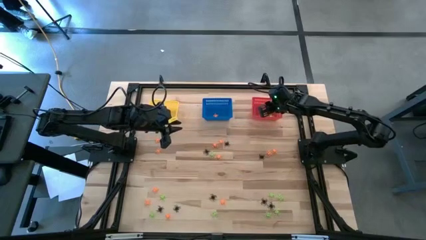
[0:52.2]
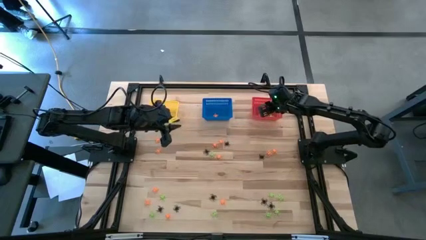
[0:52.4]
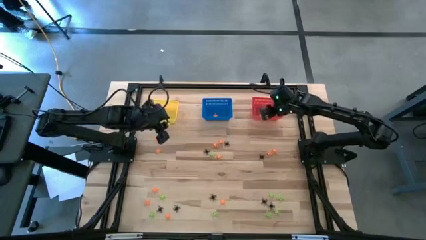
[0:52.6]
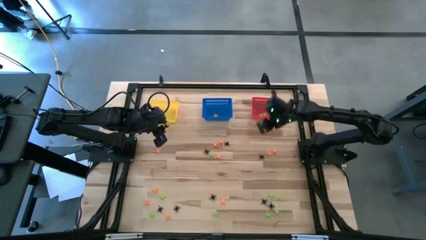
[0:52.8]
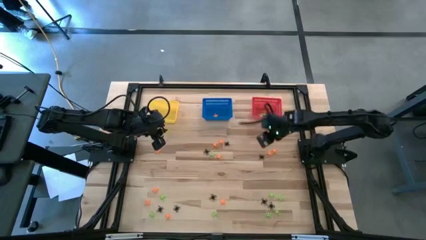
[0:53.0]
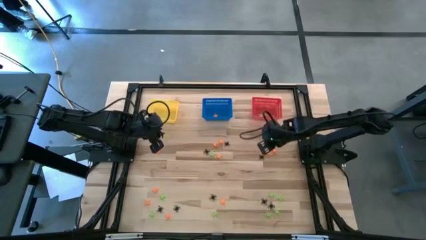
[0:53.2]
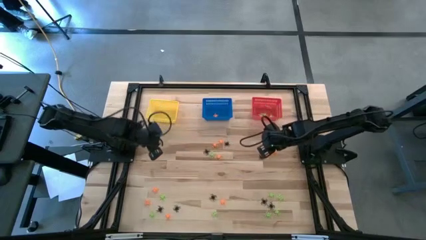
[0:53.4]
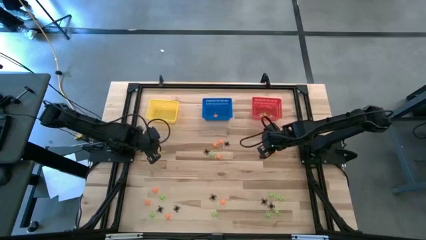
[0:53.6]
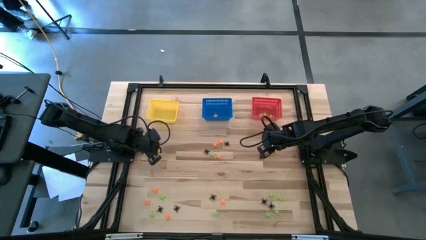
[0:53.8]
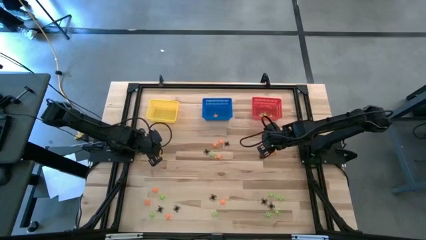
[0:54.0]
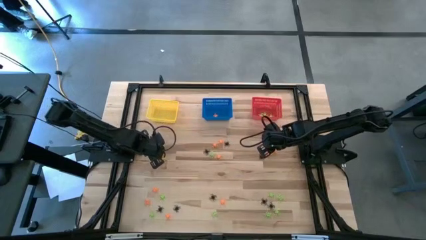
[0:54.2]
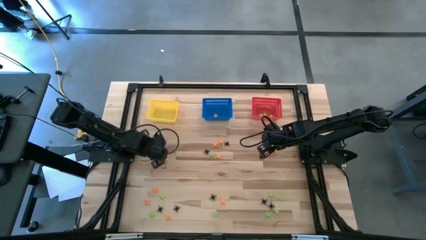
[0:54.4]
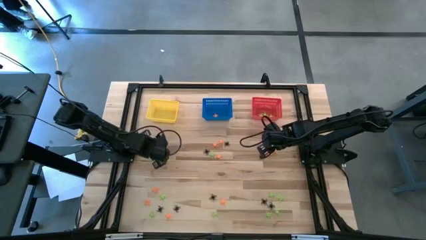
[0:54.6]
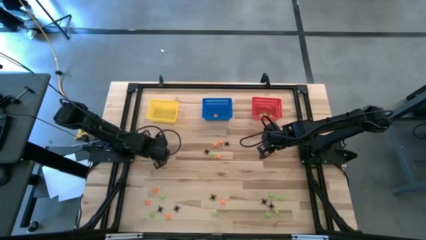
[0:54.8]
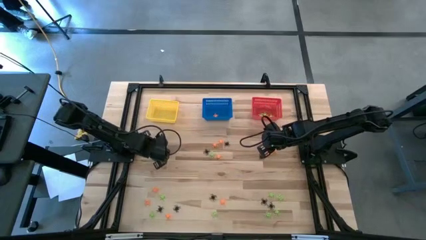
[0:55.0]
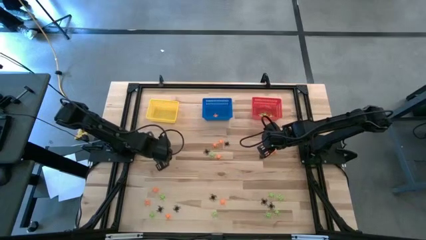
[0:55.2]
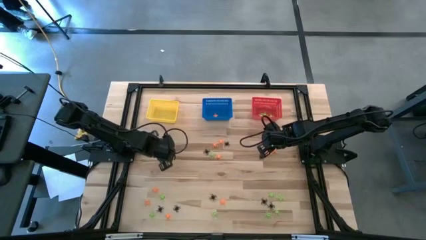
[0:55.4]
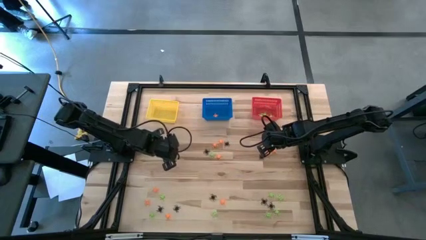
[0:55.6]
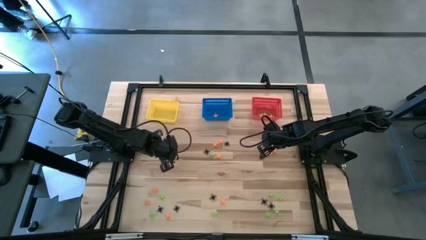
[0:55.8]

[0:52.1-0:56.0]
Task: Sort Halloween decoration
Put the orange spider toy into the blue basket

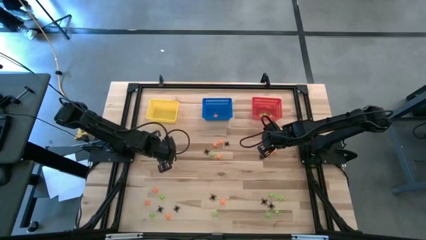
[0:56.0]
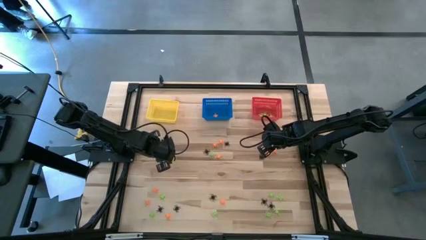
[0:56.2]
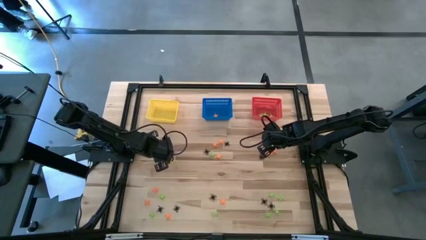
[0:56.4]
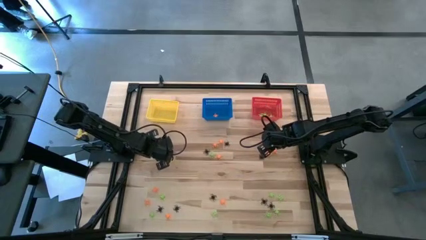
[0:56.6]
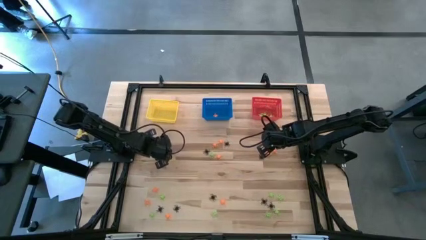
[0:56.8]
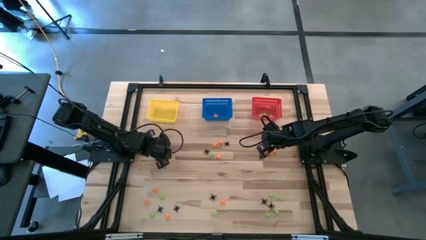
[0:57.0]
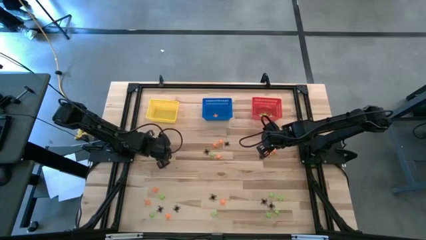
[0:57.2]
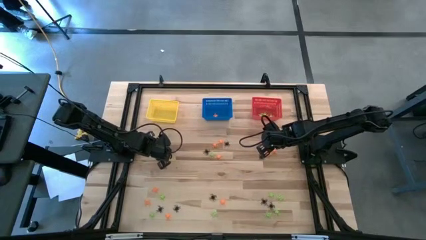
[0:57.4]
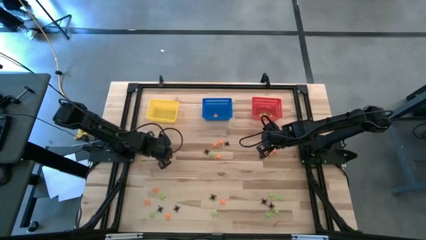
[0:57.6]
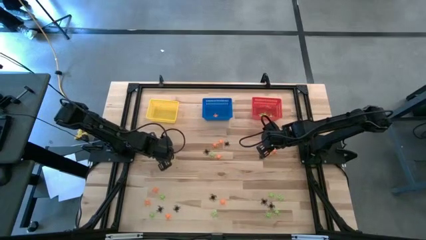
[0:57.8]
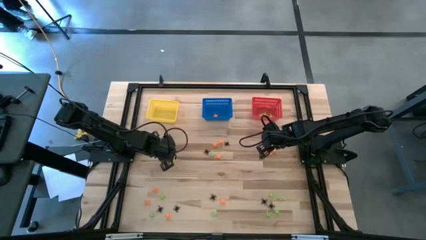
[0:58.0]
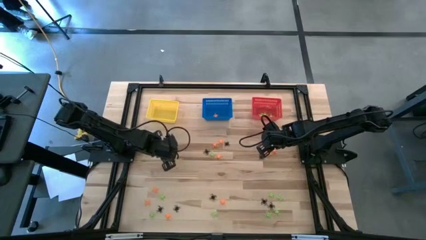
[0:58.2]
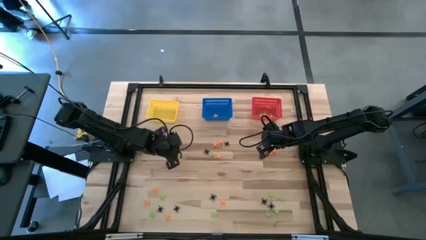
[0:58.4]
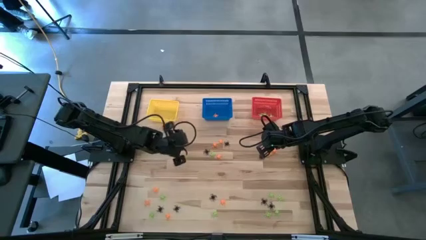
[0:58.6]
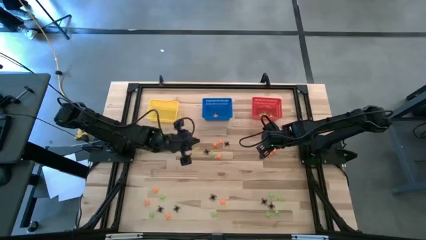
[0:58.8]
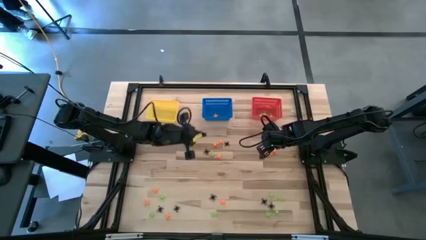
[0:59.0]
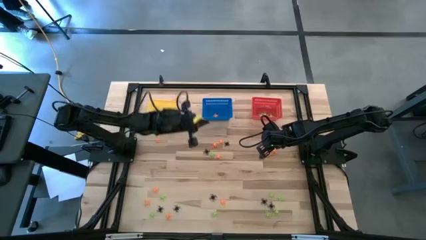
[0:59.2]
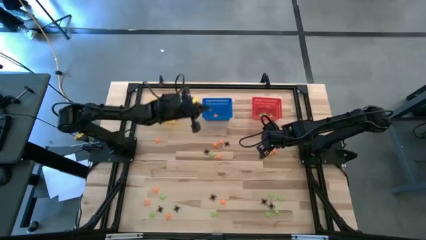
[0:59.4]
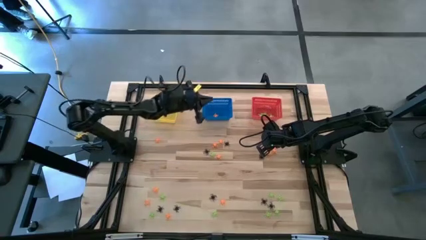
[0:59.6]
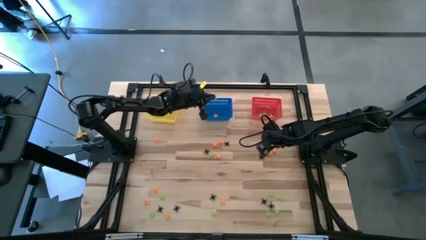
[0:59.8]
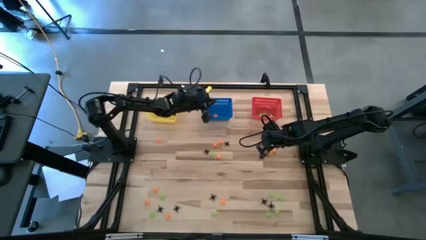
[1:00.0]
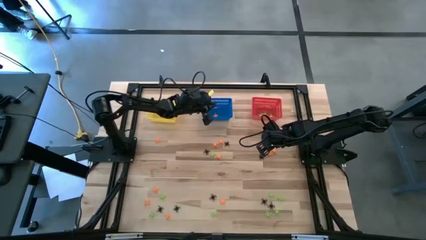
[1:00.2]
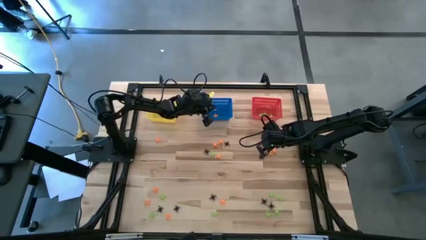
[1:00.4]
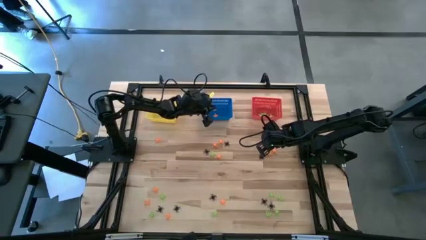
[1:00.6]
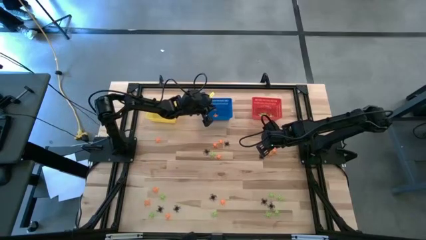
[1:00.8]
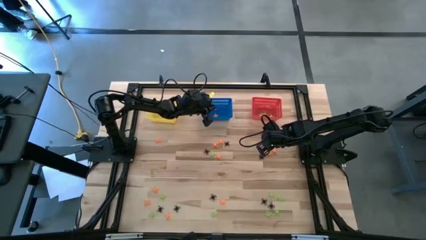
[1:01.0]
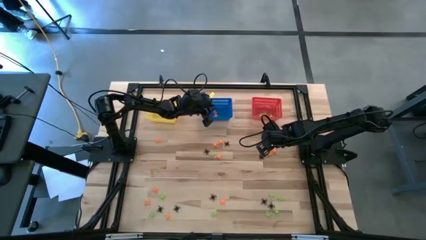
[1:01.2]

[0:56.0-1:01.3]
Put the orange spider toy into the blue basket

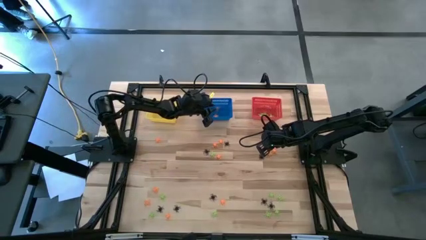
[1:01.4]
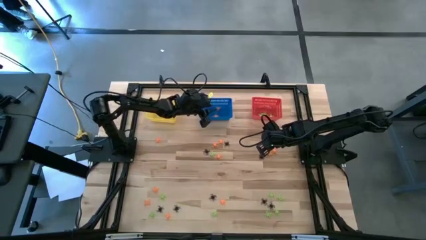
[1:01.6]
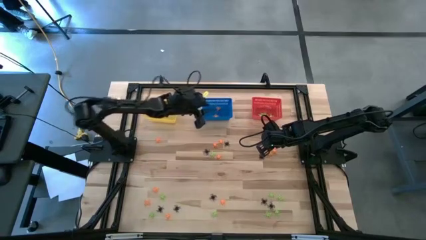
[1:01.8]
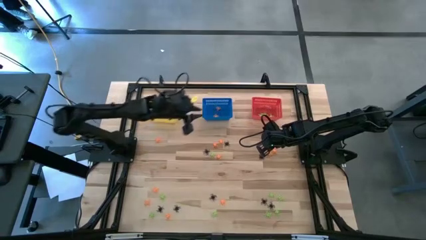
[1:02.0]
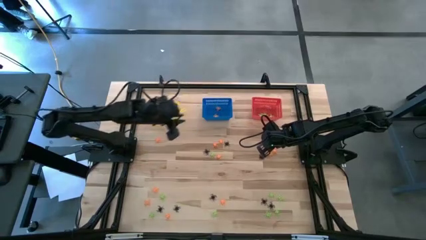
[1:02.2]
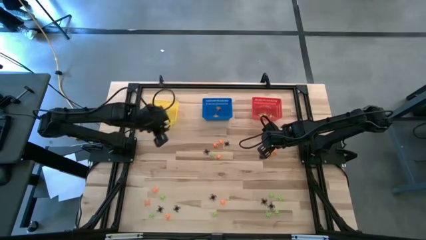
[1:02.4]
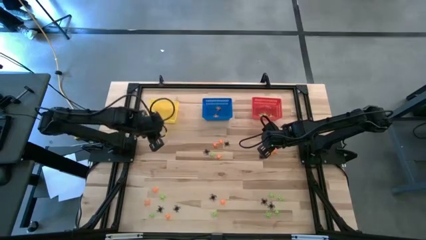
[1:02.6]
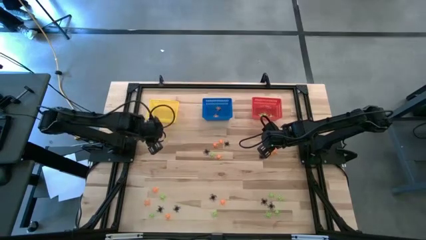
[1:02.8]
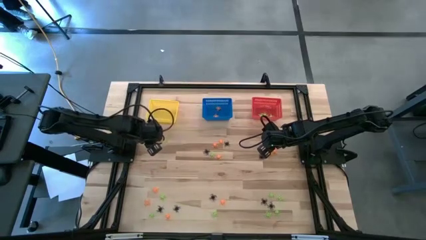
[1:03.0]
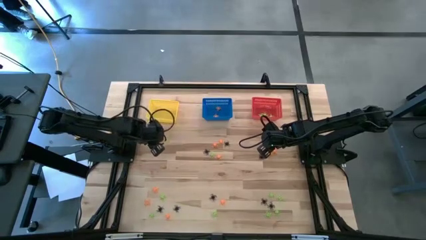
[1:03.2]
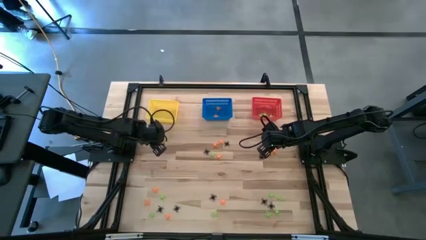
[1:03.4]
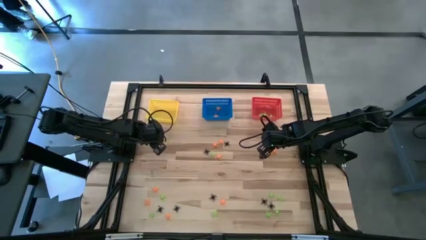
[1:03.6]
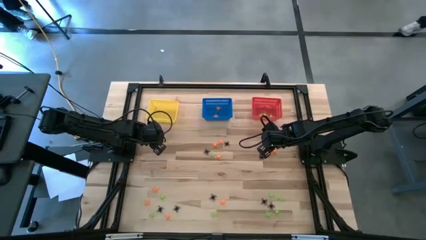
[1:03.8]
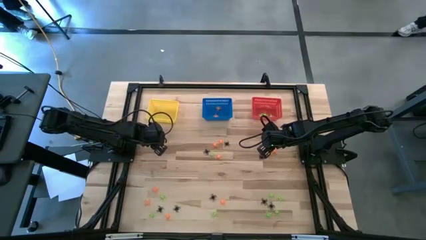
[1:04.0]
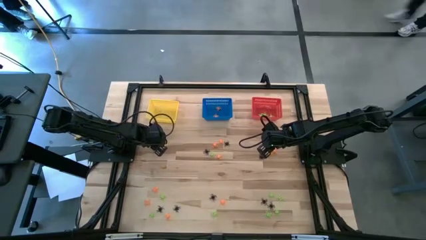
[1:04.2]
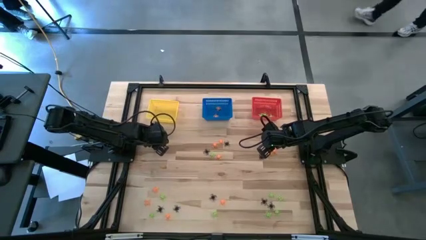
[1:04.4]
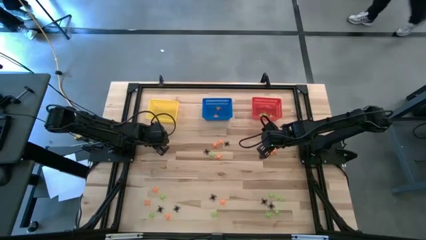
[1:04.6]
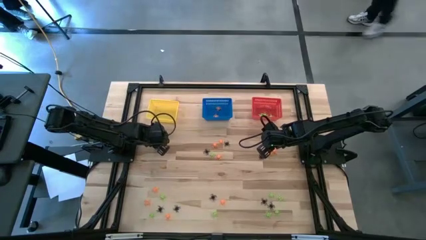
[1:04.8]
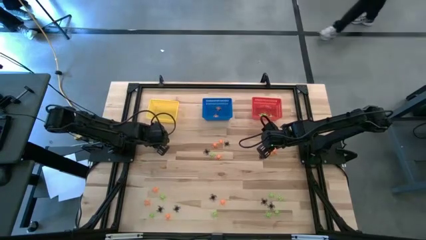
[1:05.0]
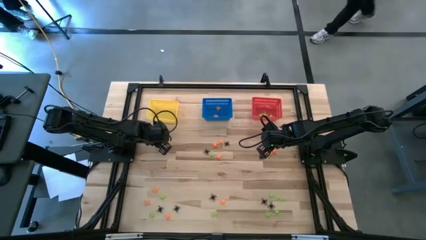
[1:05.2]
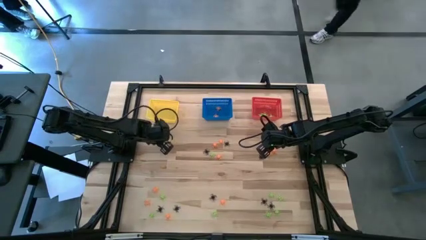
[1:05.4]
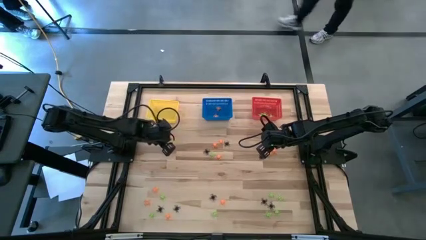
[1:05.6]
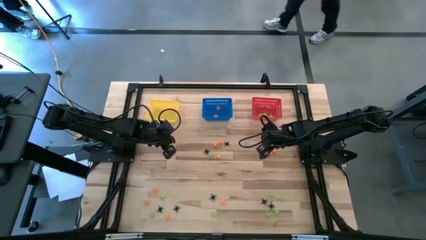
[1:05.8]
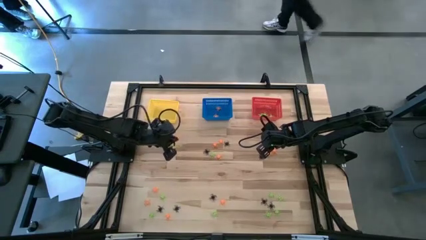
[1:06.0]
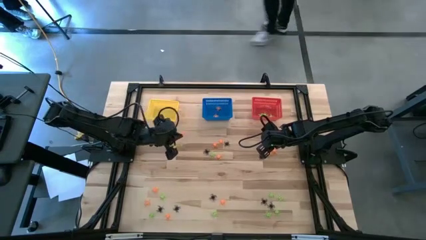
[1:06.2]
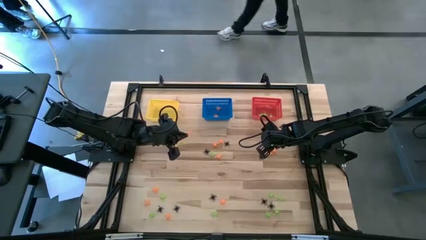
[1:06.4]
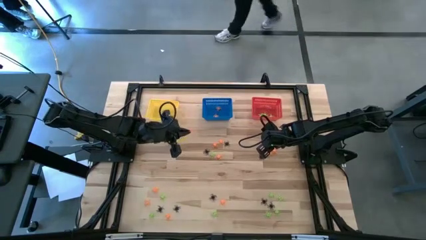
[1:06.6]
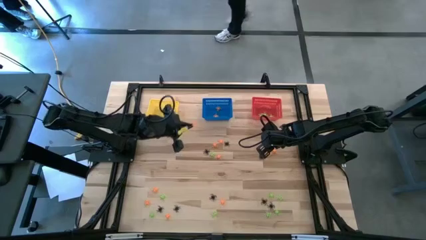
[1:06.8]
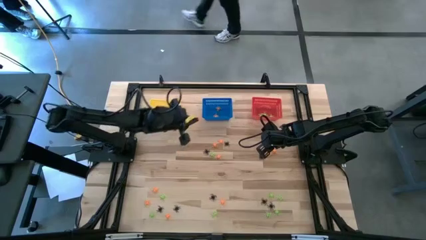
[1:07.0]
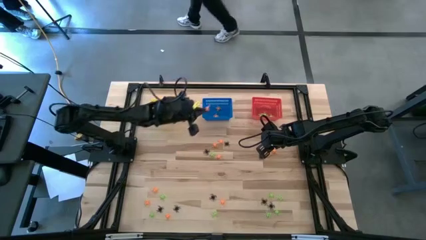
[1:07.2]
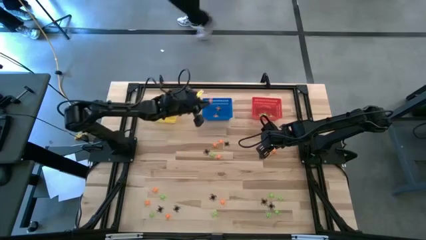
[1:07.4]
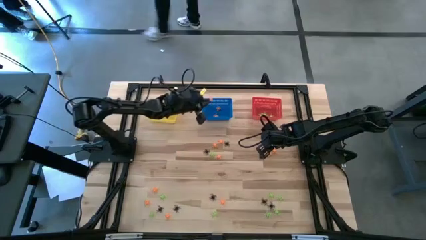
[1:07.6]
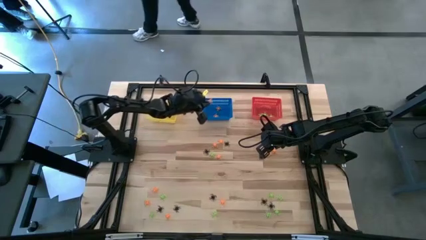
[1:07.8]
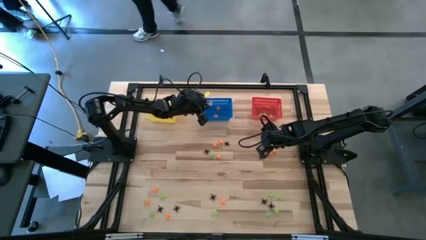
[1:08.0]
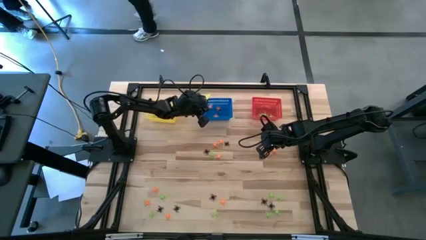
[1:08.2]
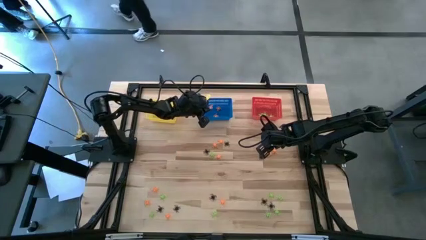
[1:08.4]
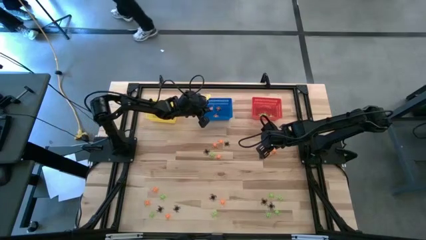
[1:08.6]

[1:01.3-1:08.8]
Put the orange spider toy into the blue basket
